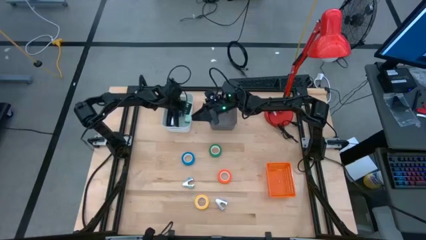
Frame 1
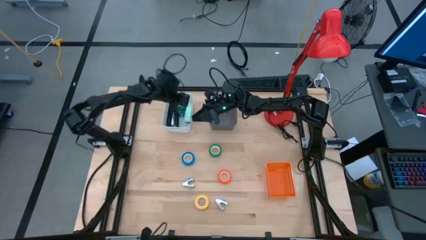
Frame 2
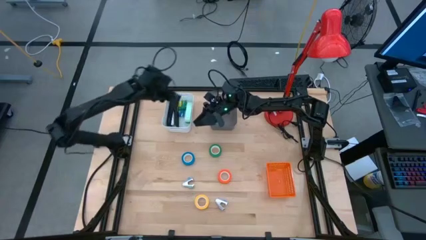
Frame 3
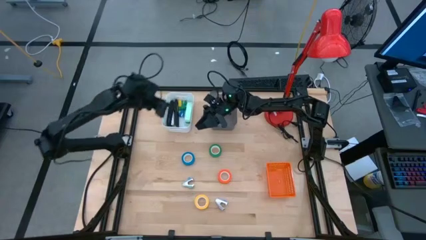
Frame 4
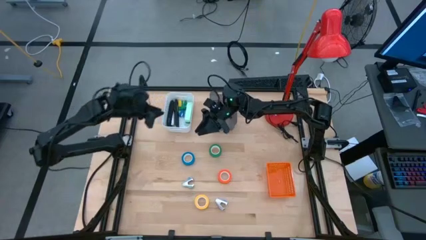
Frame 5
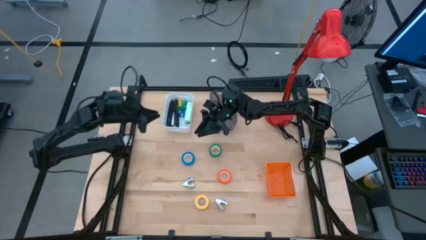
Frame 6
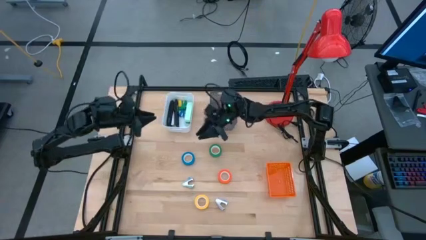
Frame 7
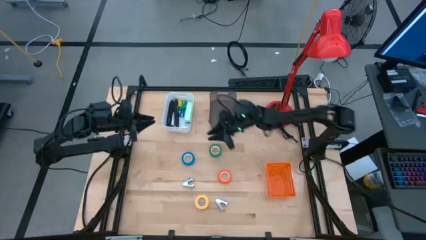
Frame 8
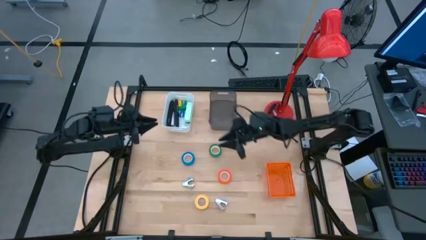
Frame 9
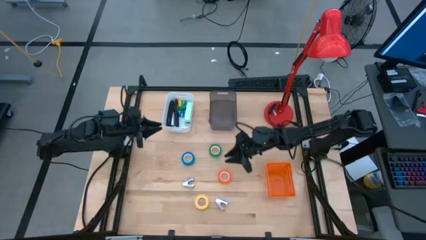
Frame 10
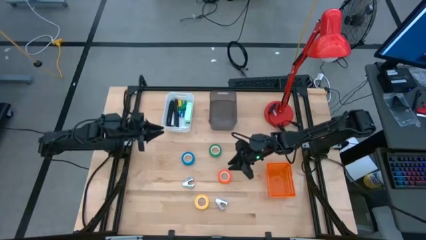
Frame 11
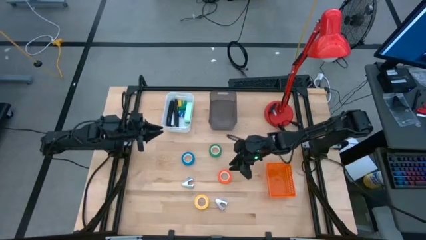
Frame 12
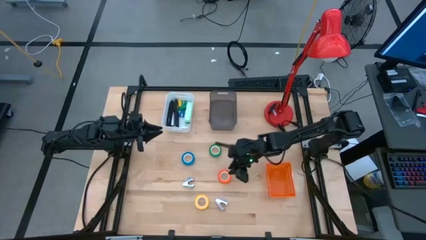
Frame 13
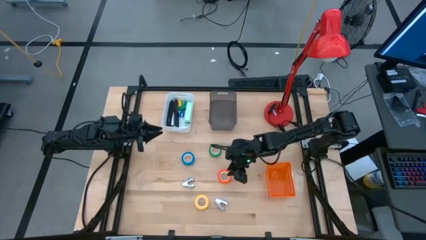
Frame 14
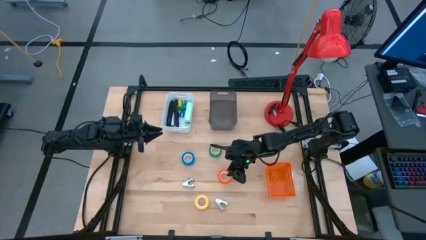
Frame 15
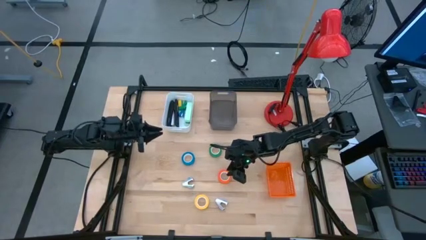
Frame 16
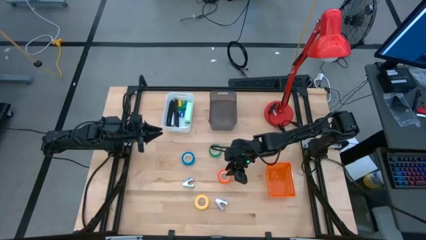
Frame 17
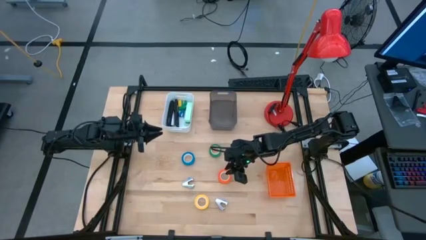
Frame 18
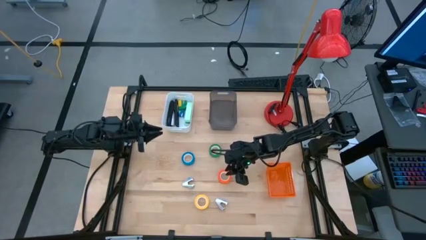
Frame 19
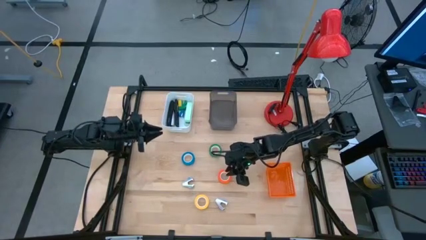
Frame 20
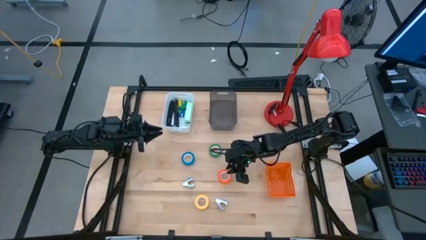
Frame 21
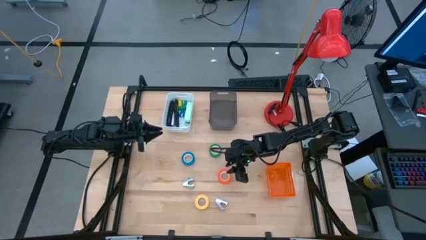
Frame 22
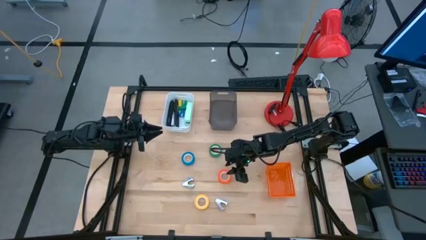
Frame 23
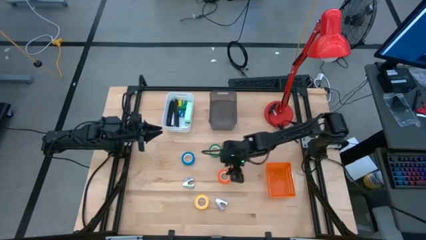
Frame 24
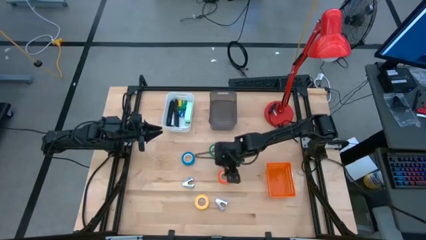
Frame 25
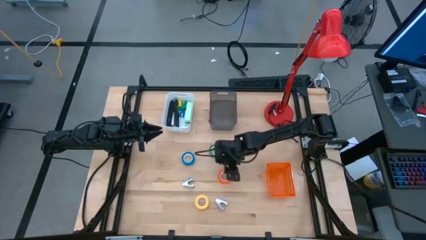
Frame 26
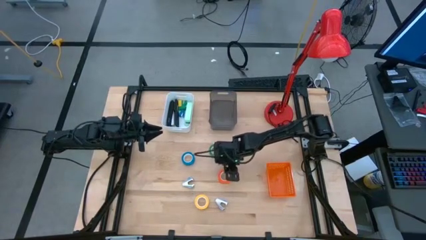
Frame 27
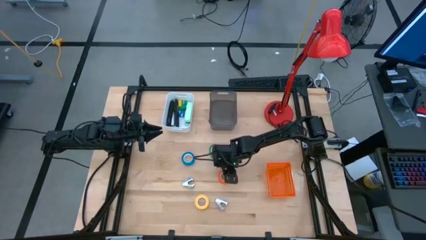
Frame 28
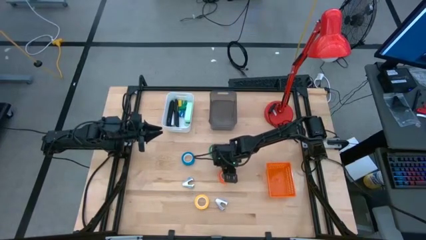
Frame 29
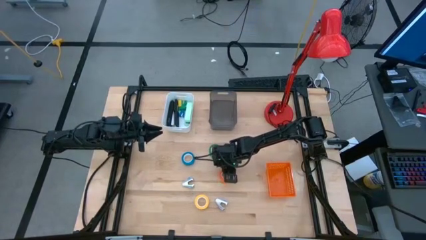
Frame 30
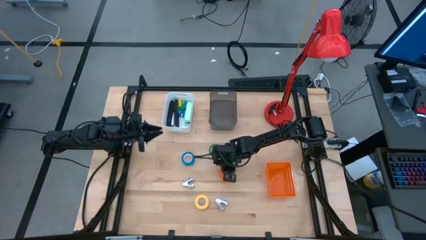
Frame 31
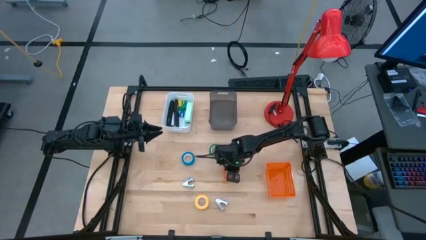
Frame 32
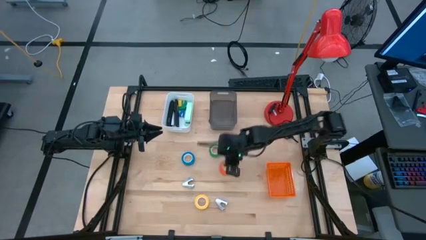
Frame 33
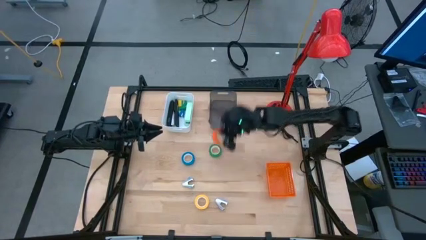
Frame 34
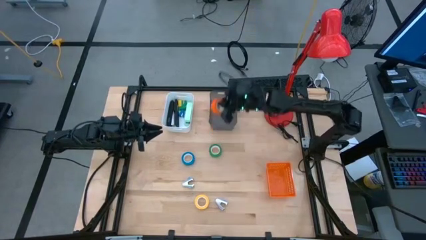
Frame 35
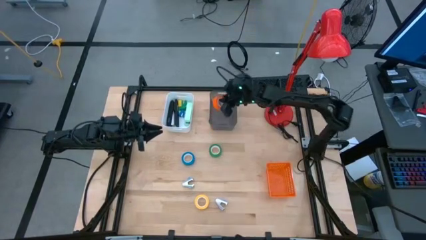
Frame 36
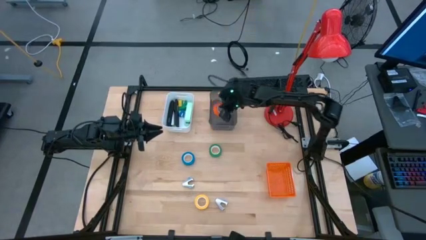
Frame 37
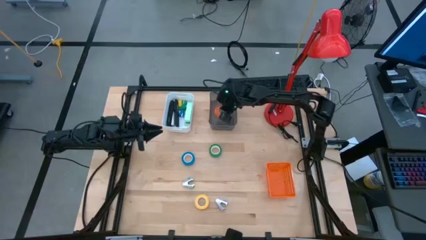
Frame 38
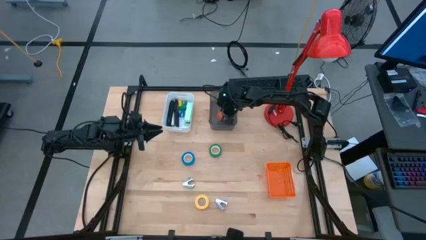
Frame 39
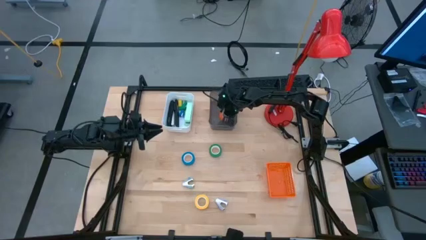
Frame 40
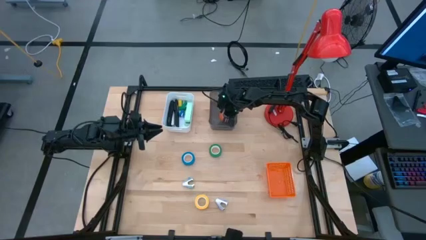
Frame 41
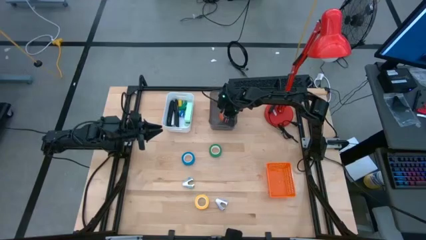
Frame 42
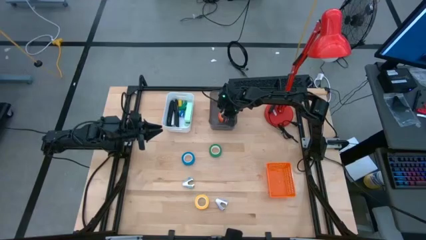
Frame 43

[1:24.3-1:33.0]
Task: Pick and place Stapler, Stapler remover, tape
Put the orange tape into the black bin

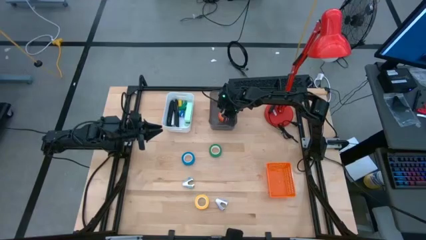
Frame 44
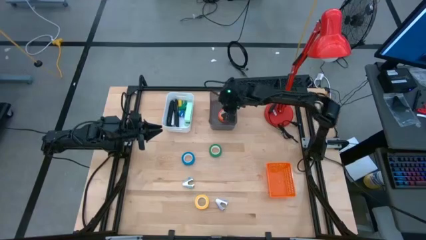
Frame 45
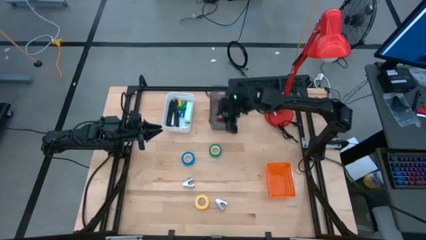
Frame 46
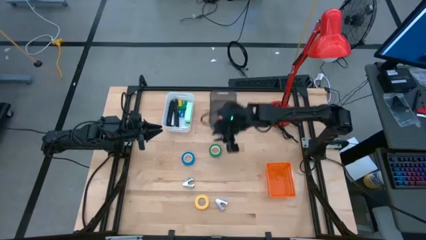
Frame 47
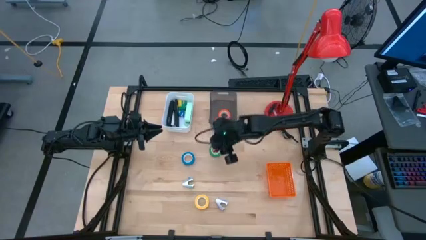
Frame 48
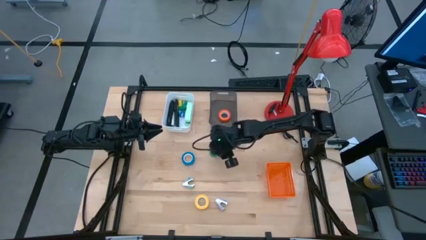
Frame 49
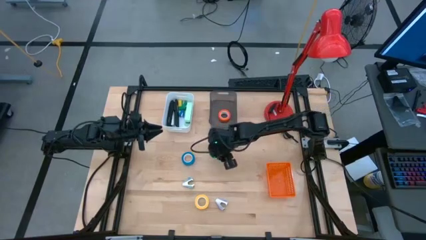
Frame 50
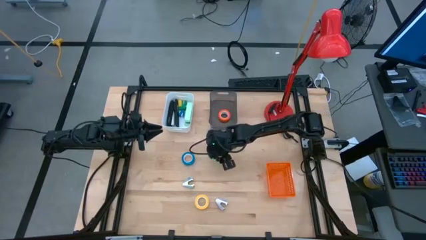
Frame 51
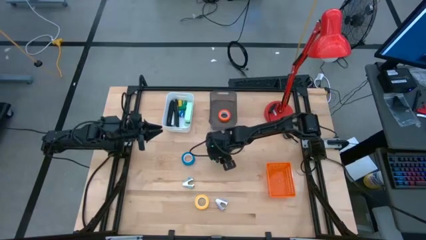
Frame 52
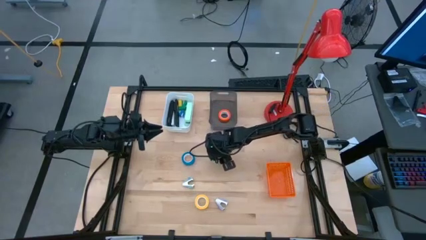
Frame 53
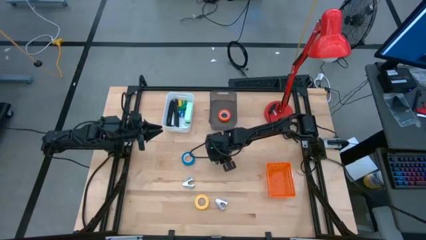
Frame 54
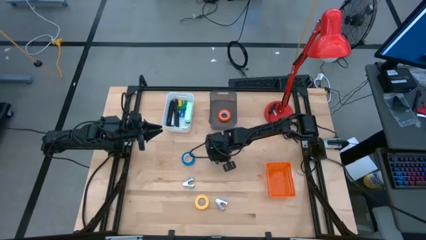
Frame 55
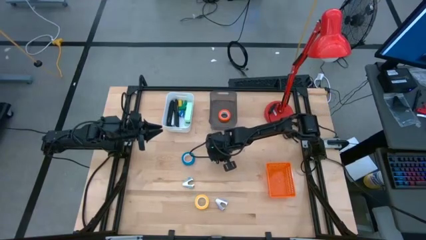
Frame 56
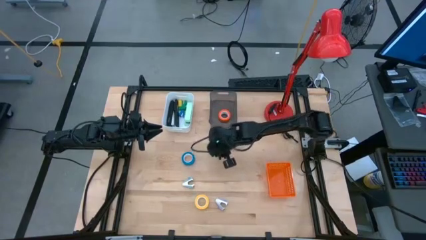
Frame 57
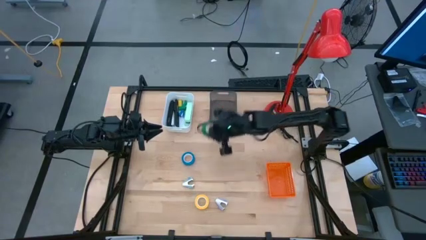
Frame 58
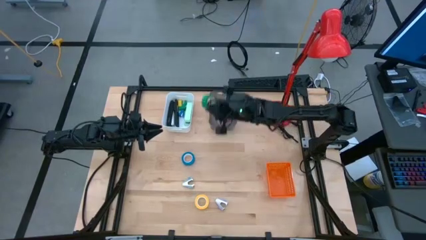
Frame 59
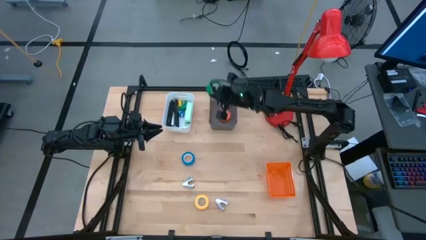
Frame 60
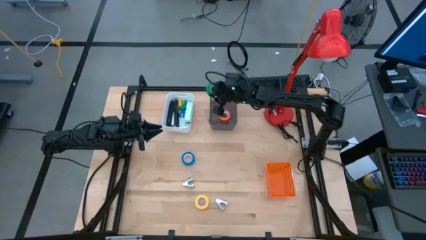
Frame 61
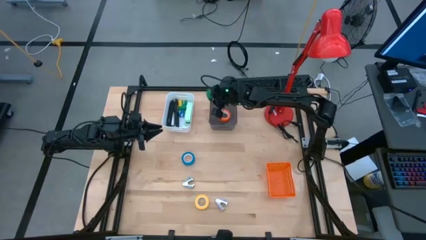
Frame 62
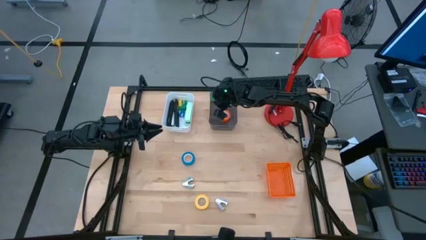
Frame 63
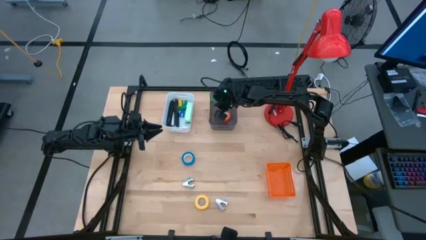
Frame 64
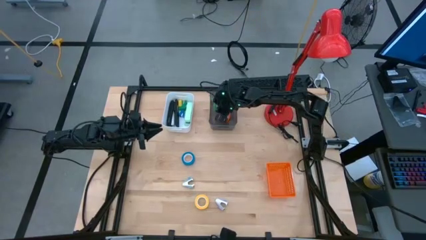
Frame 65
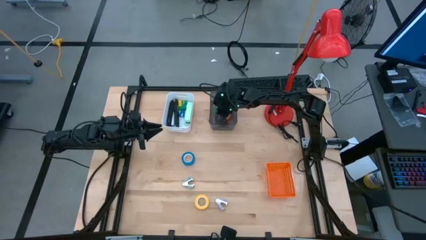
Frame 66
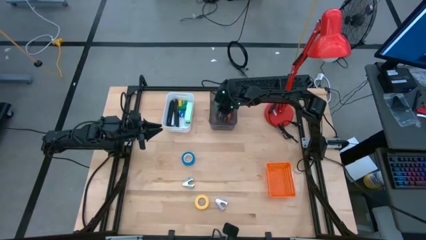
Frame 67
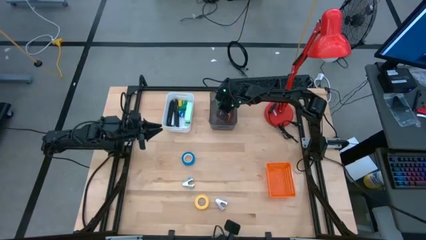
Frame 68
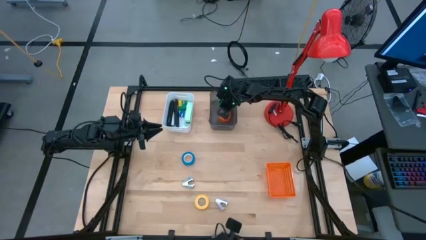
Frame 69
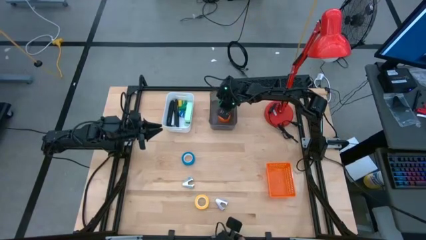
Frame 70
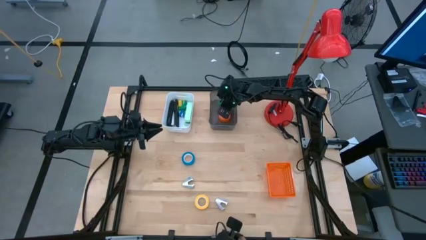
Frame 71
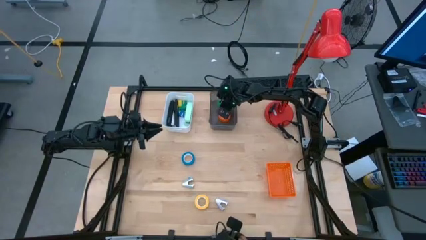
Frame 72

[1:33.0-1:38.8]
Put the green tape into the black bin
